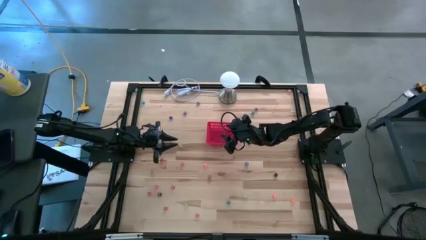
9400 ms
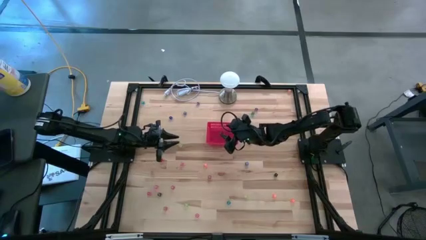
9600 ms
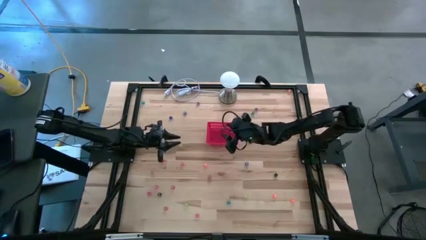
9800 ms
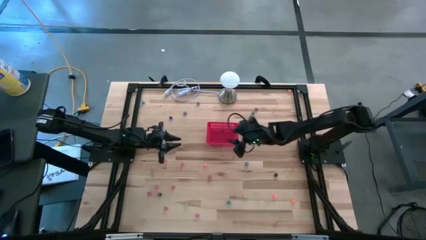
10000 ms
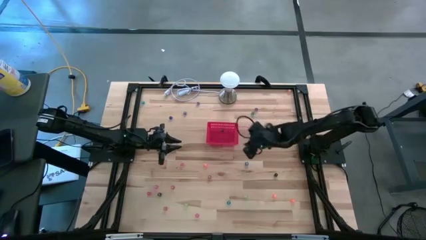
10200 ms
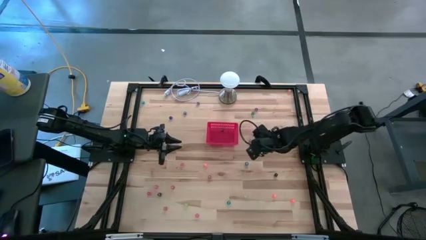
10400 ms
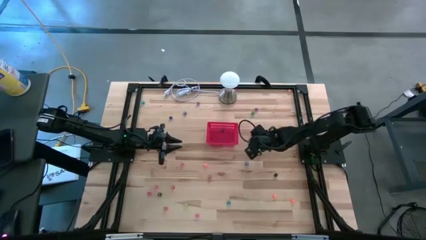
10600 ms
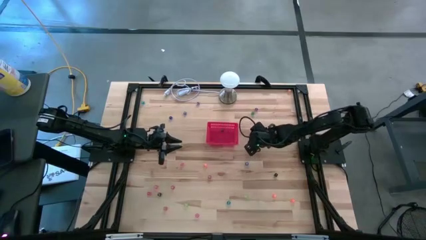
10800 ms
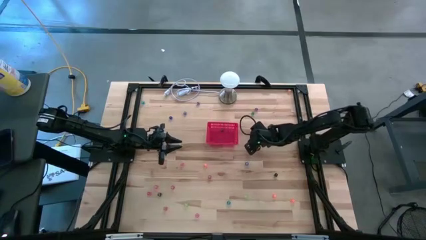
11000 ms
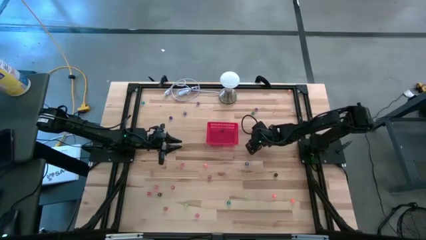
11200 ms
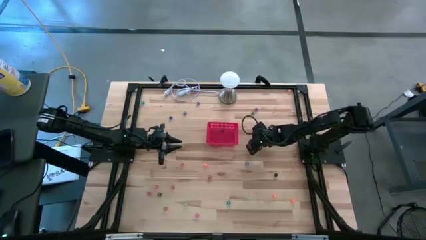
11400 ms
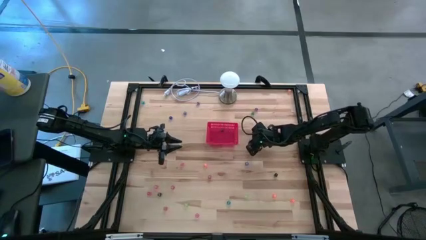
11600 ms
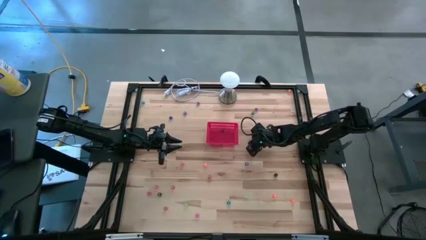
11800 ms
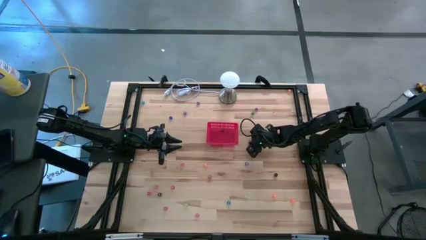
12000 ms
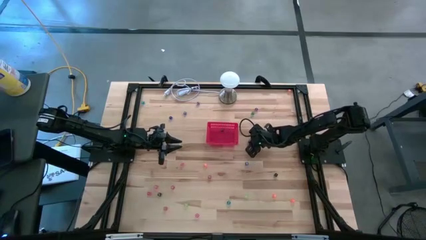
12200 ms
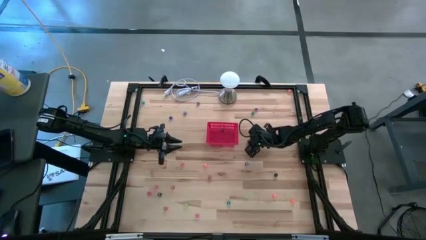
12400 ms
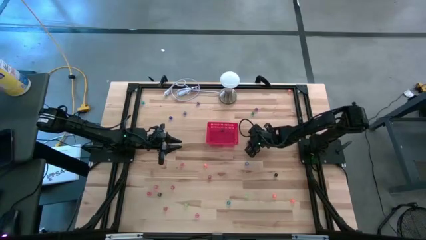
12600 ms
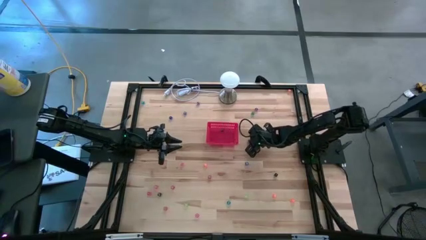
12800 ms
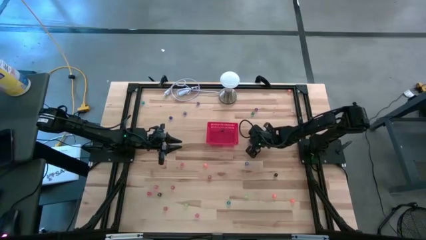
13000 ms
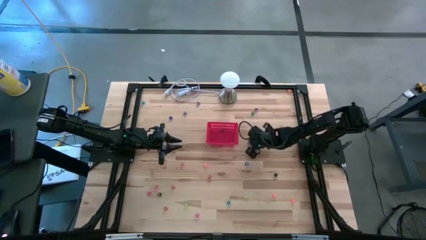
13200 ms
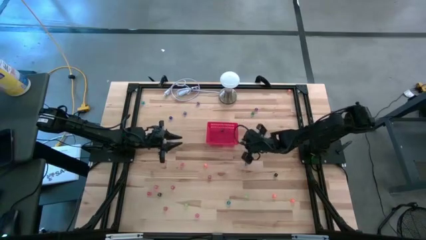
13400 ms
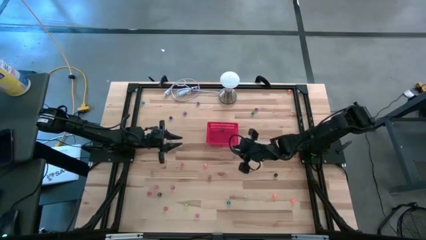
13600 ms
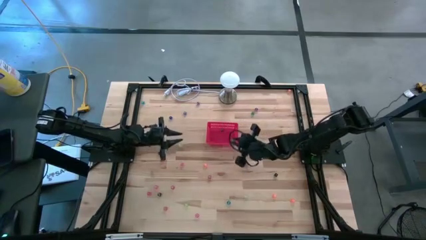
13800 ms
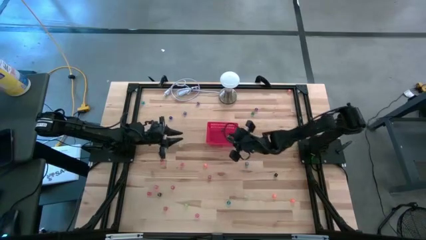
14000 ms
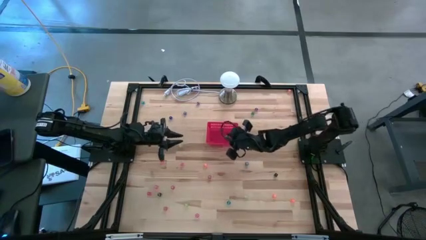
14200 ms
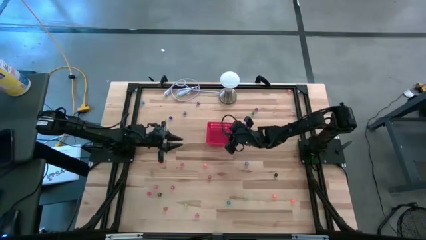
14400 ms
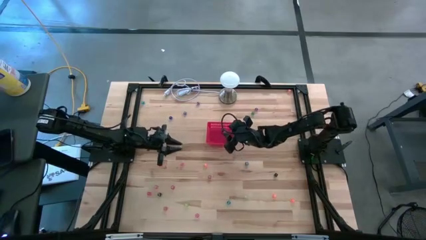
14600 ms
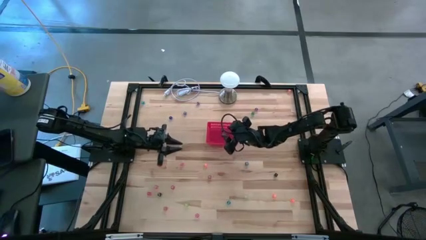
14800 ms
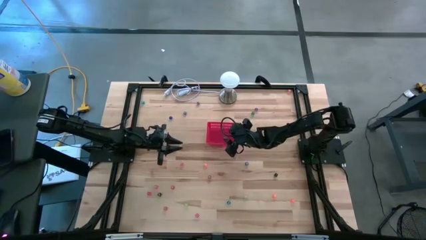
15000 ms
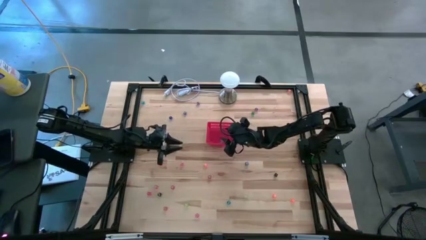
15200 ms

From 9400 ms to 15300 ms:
Task: Pick & Place Dice
Put the bottom green dice into the bin

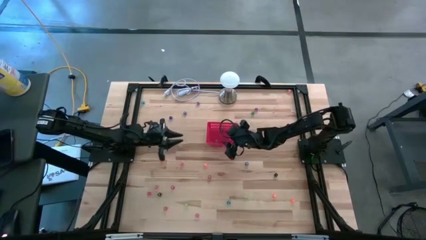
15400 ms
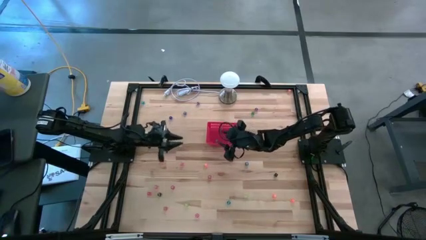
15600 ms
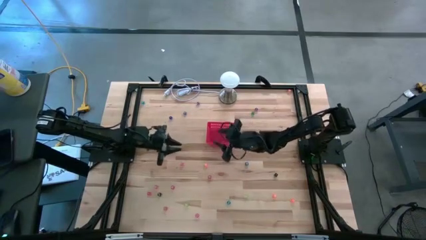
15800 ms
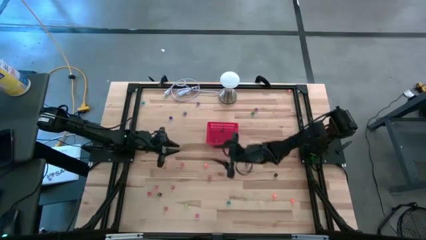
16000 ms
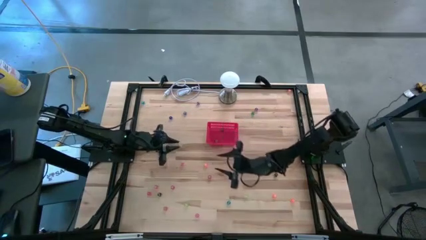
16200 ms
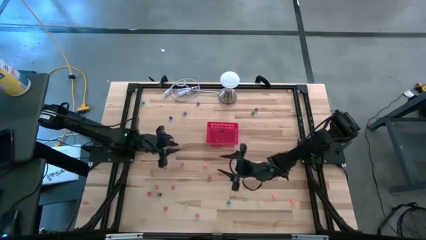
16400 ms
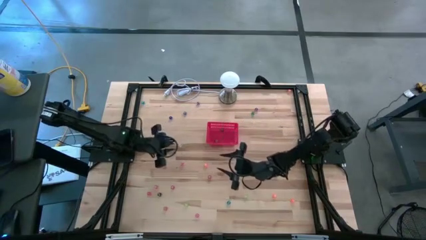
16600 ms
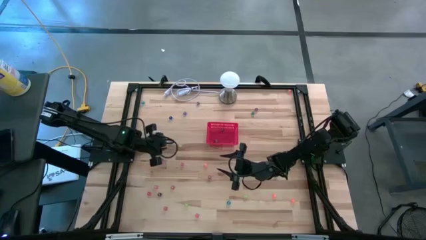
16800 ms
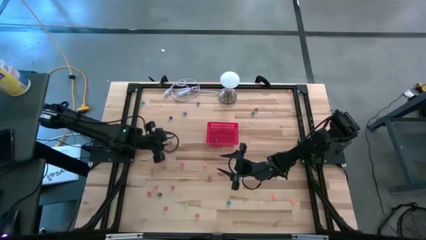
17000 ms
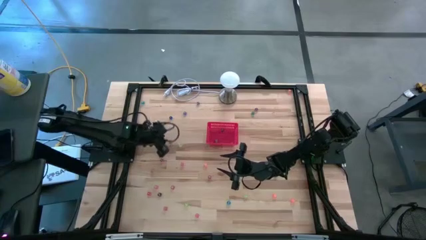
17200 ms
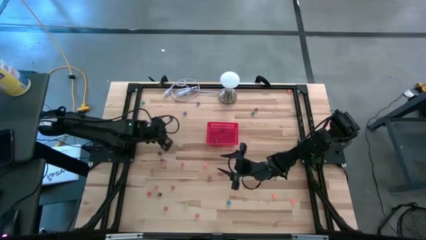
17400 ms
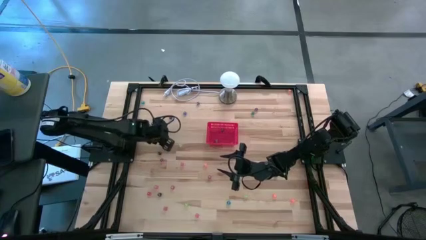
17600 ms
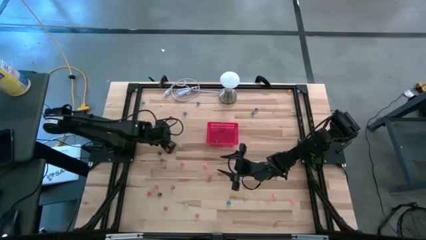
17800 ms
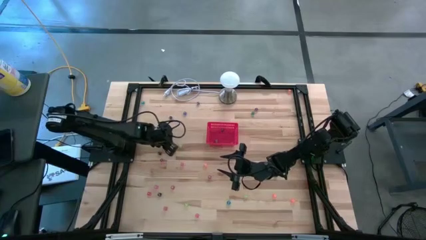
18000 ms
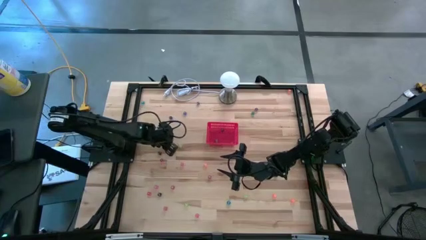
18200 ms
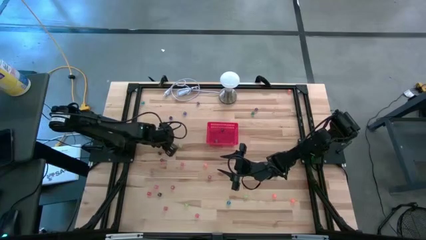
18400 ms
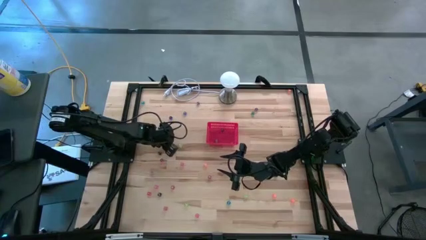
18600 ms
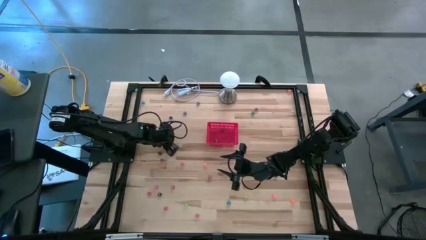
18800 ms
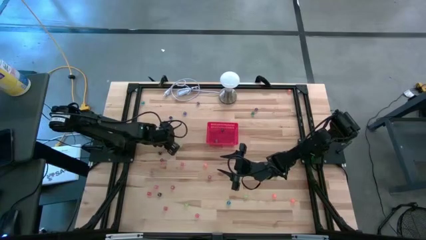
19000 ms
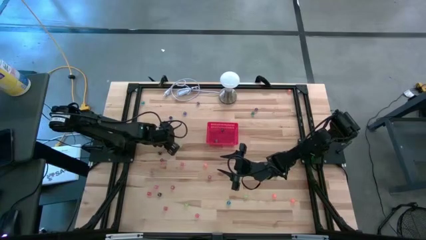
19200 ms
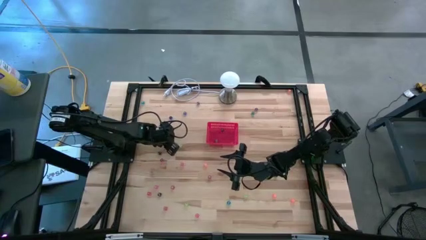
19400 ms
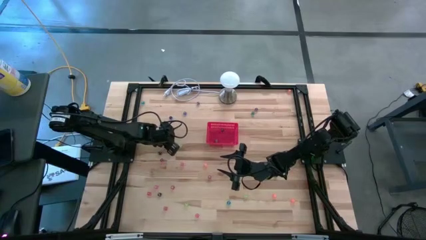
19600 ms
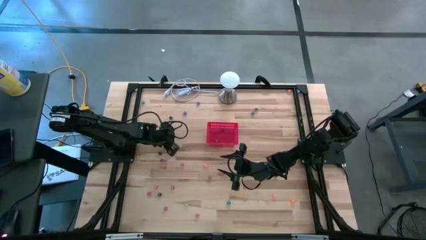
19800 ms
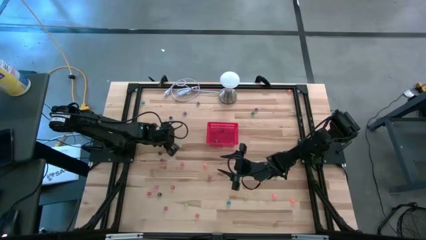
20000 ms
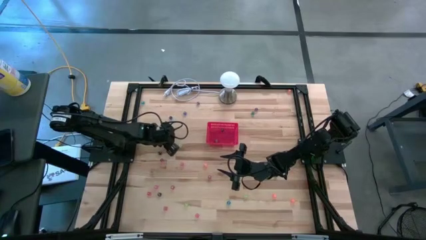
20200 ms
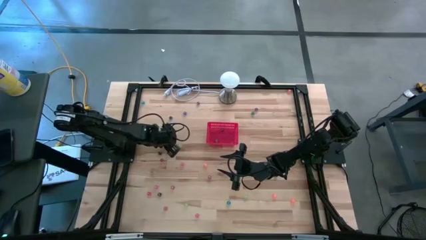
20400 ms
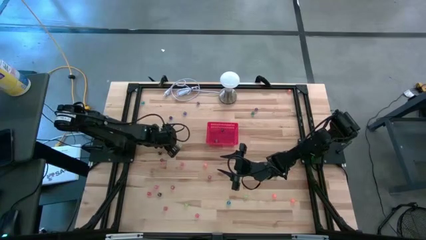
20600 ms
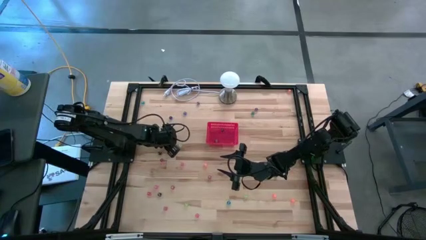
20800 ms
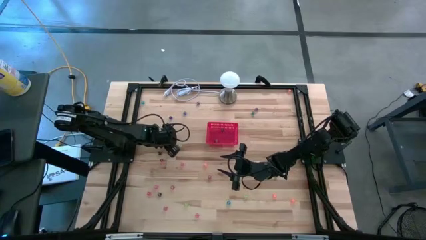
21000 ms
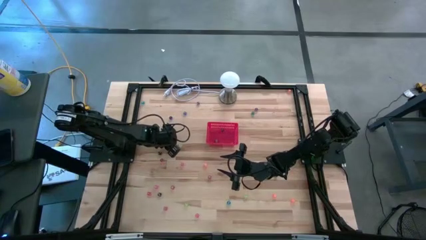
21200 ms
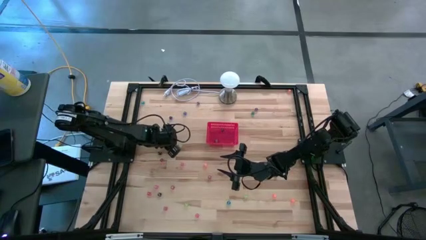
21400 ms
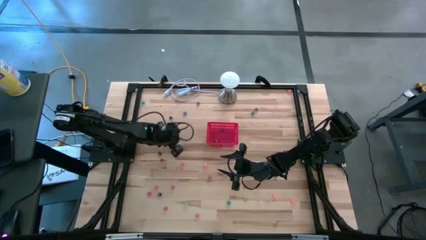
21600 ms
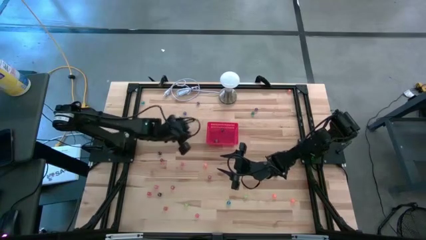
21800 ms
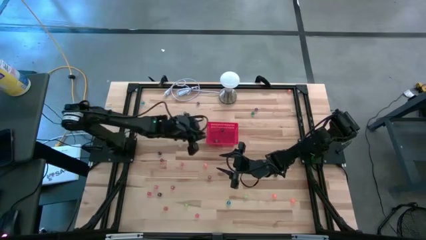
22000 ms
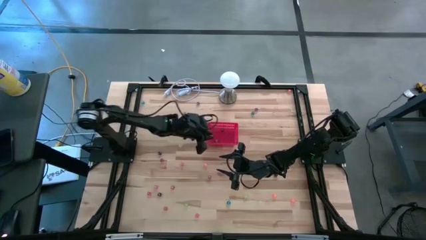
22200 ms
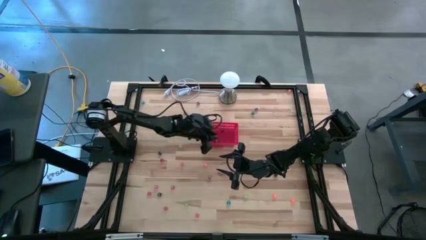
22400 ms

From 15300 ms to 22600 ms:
Put the bottom purple dice into the bin

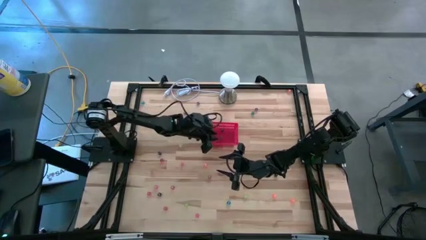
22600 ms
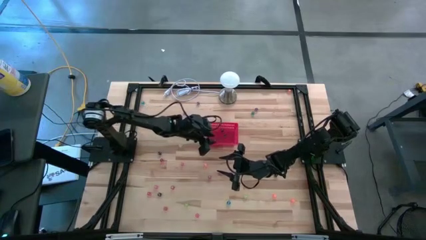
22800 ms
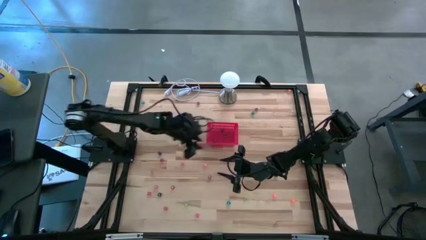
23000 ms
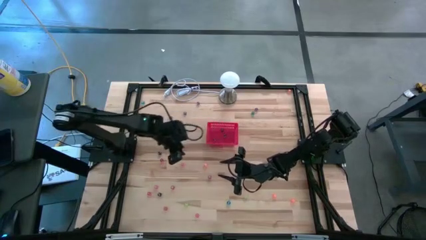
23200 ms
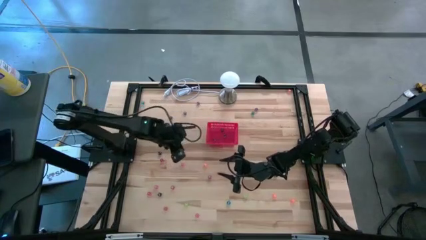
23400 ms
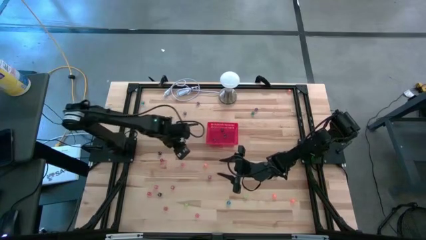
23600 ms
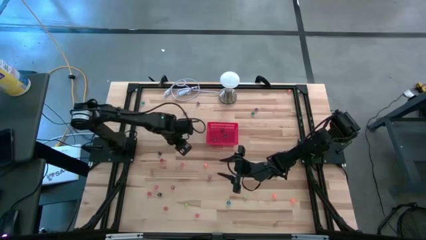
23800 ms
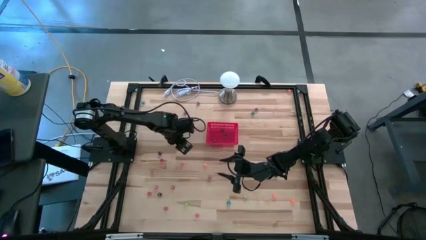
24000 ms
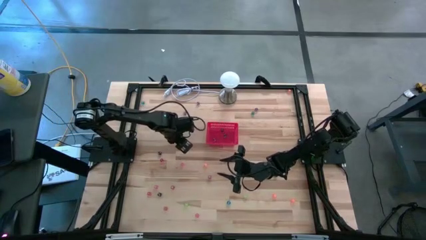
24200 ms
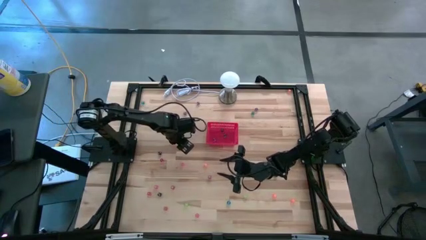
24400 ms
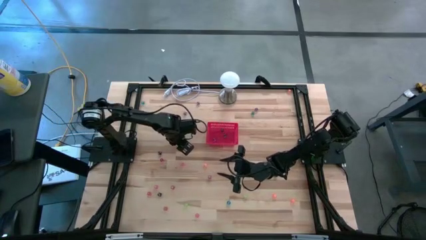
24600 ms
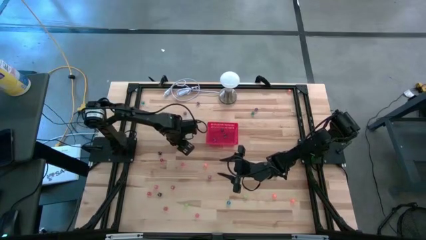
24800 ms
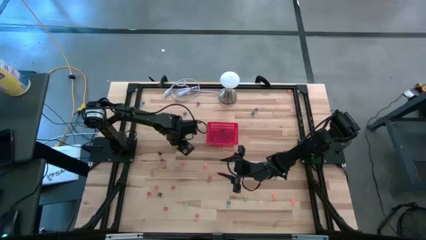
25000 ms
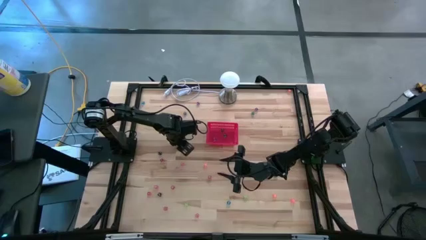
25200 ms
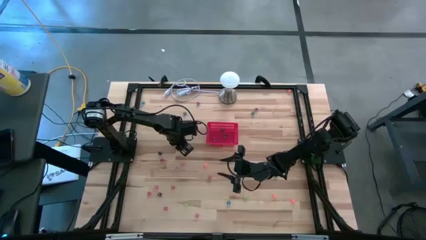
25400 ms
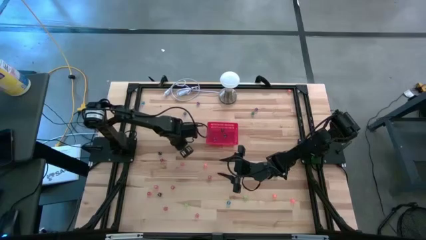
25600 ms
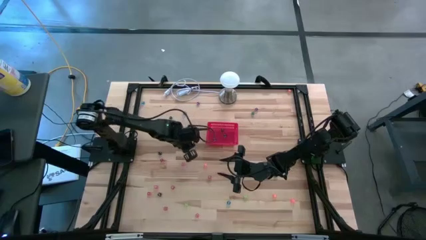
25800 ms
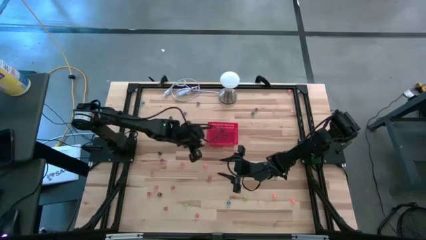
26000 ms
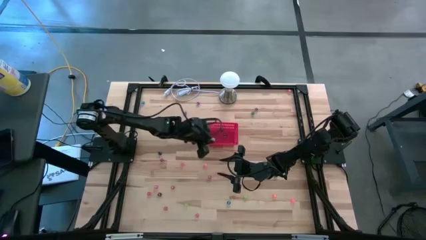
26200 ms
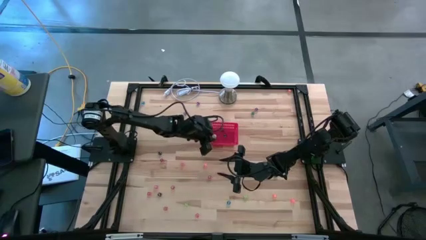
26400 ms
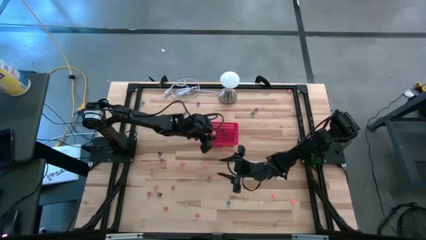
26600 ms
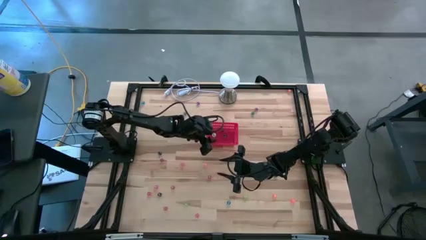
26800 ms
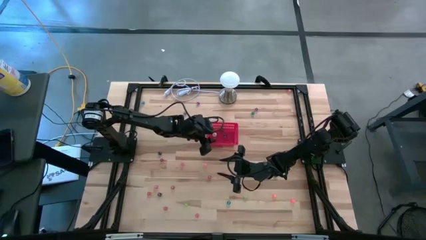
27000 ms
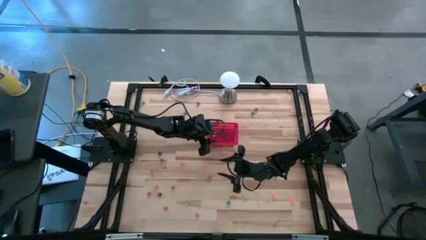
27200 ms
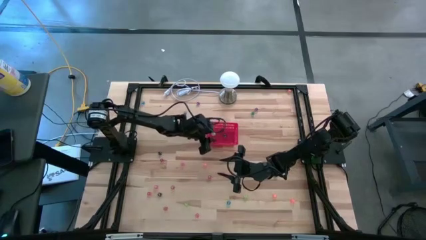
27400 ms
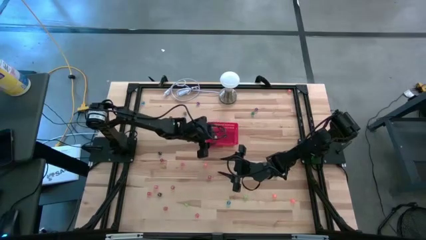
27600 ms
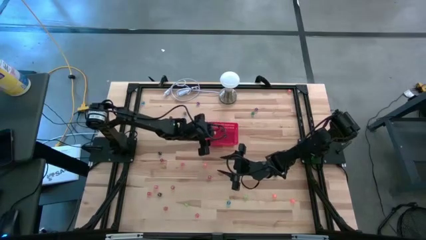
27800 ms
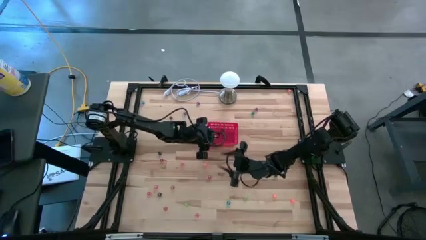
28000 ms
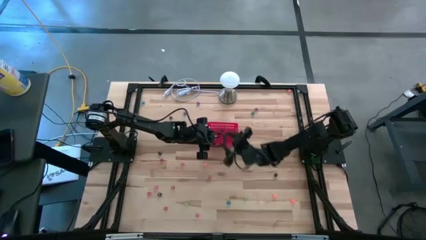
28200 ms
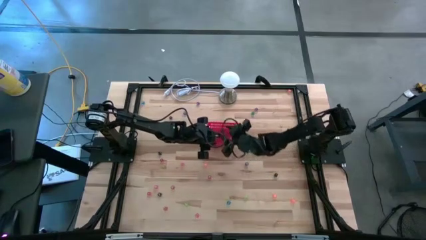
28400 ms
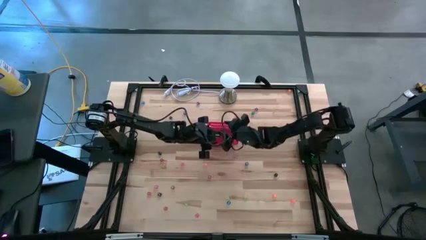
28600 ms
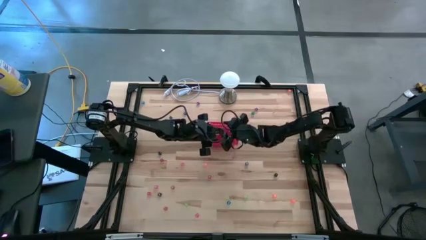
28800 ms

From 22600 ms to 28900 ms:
Put the top light green dice into the bin
